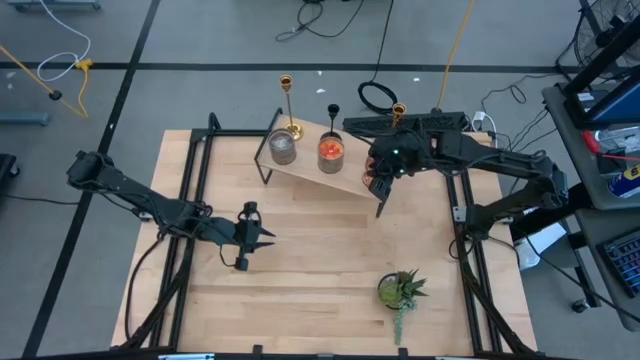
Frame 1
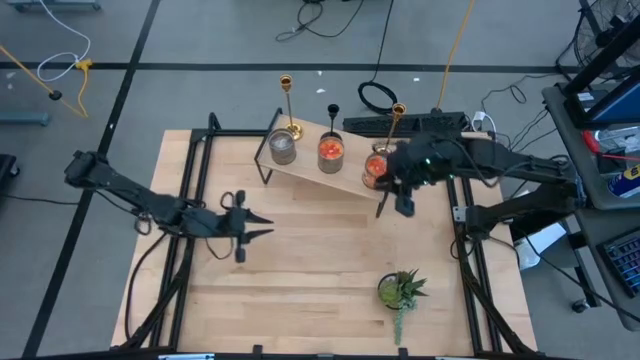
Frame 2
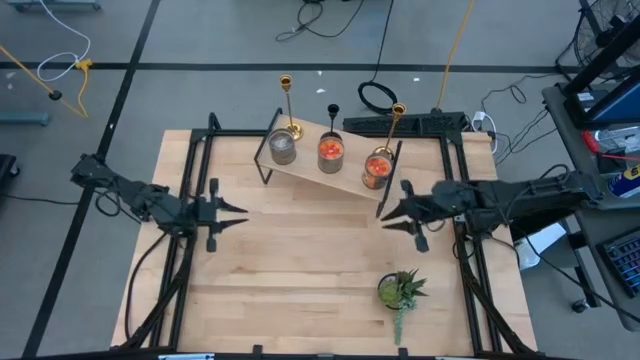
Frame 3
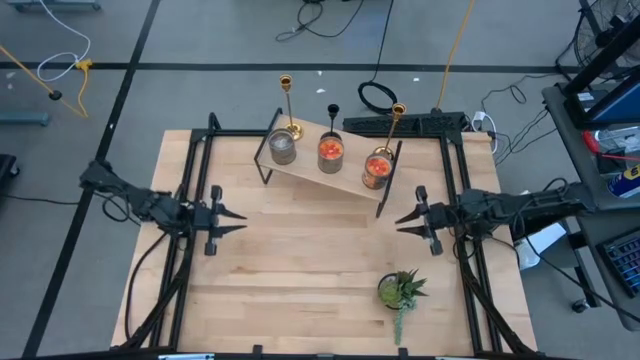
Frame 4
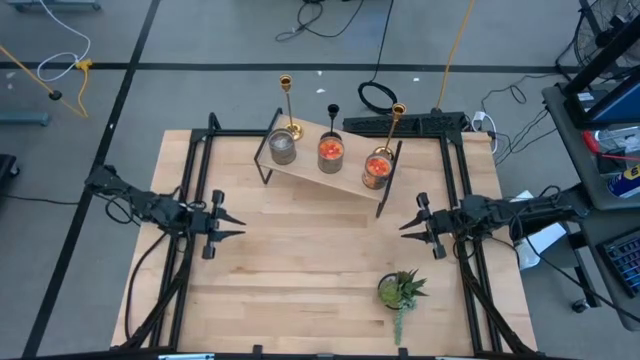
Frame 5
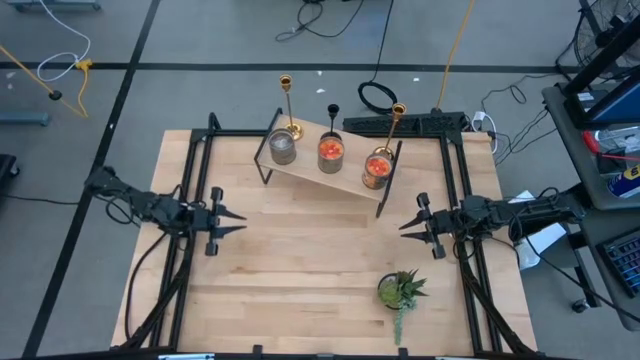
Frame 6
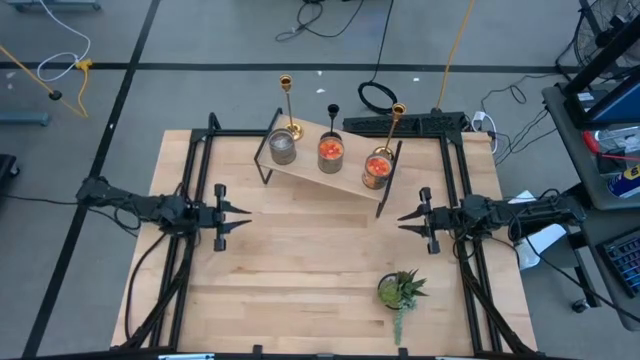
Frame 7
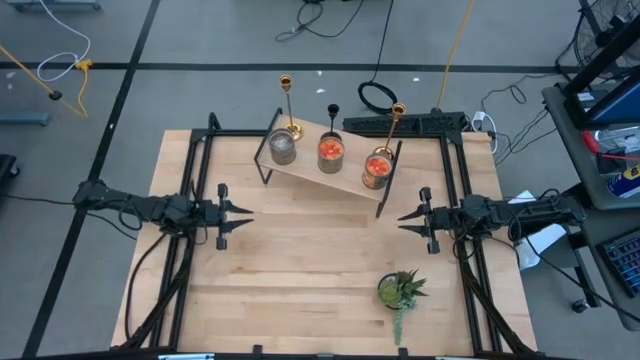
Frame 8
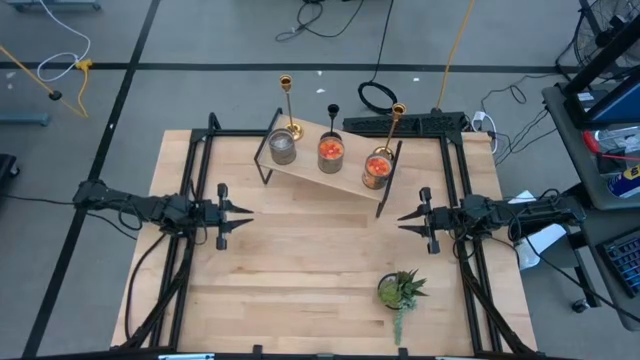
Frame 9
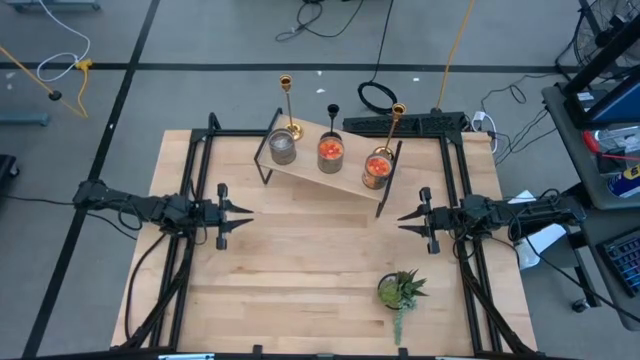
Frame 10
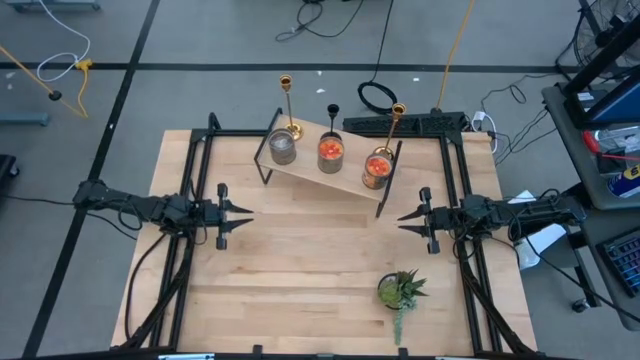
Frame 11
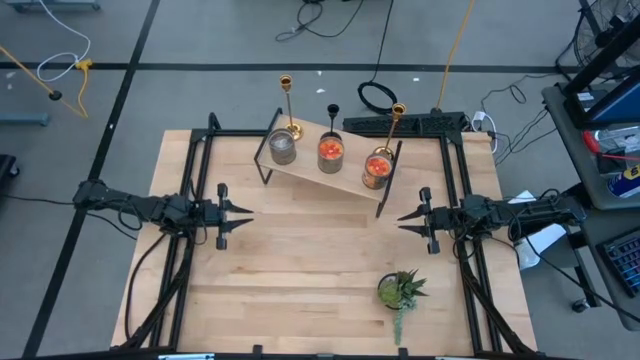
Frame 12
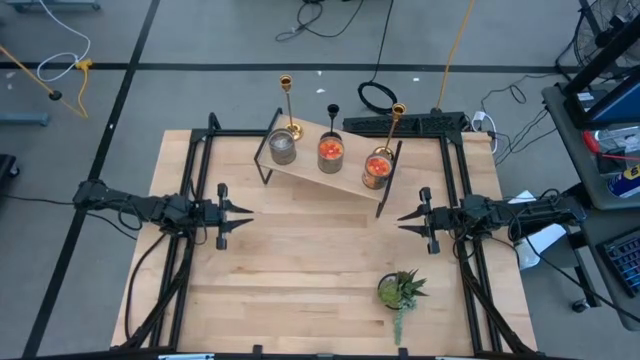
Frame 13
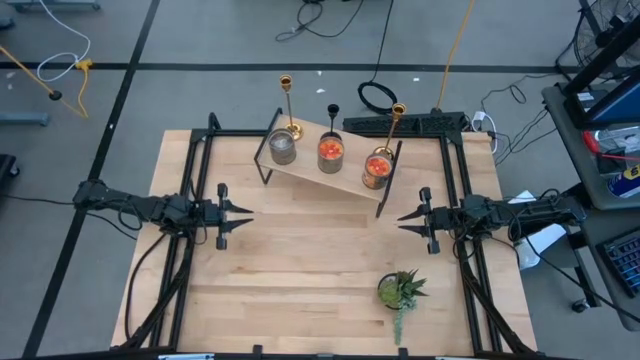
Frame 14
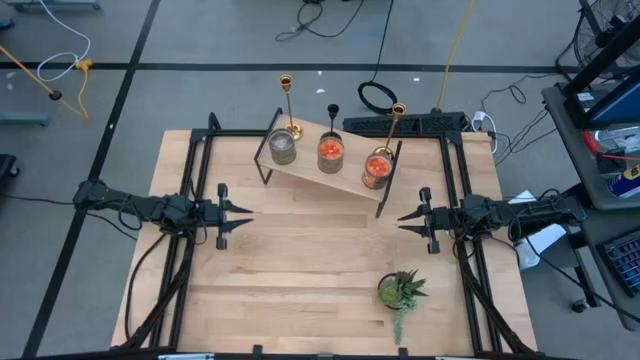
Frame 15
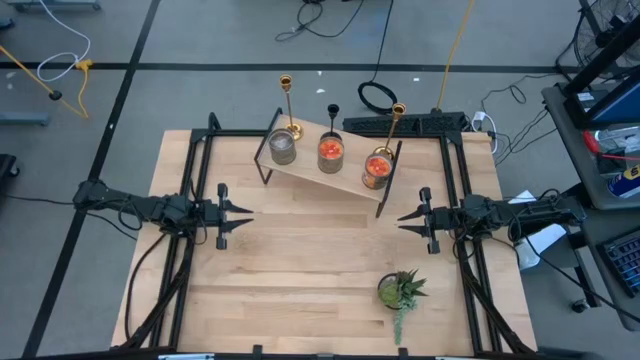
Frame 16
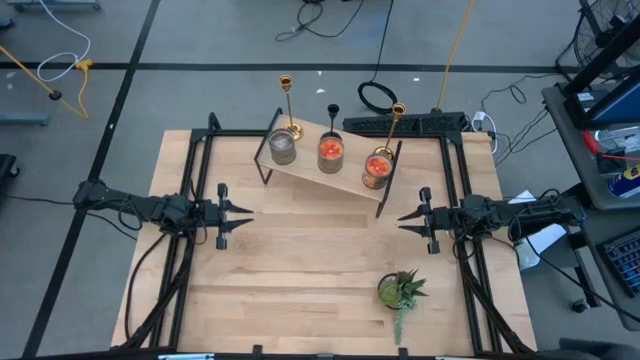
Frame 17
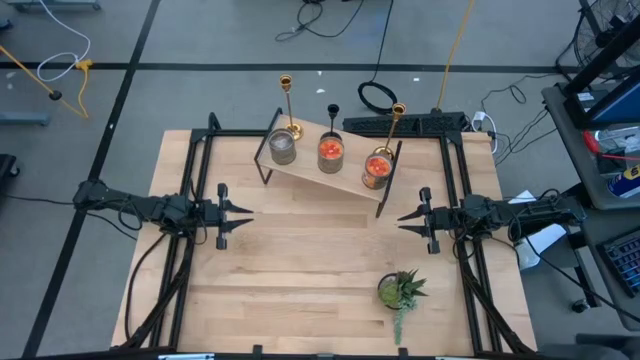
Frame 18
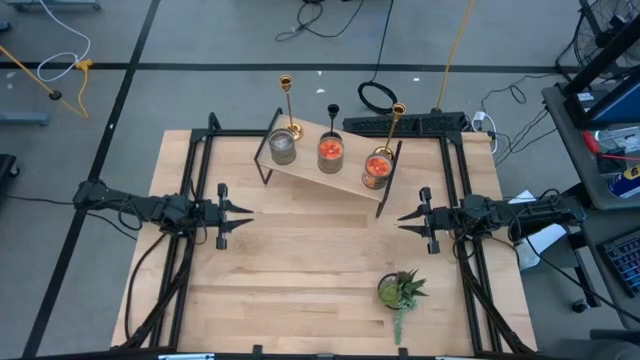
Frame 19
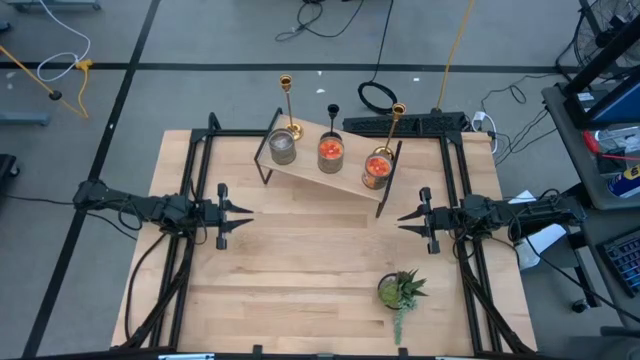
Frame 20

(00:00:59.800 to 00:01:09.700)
Task: Pick & Place candle stick holders
Return to Home Position

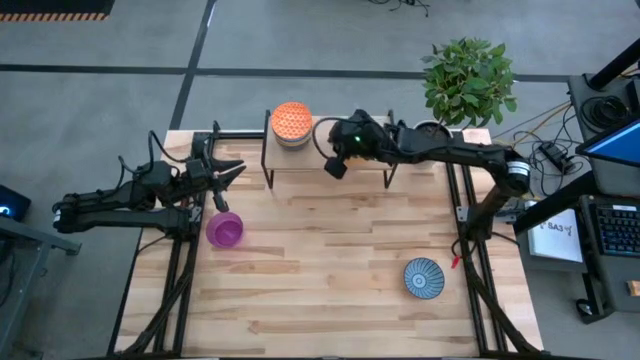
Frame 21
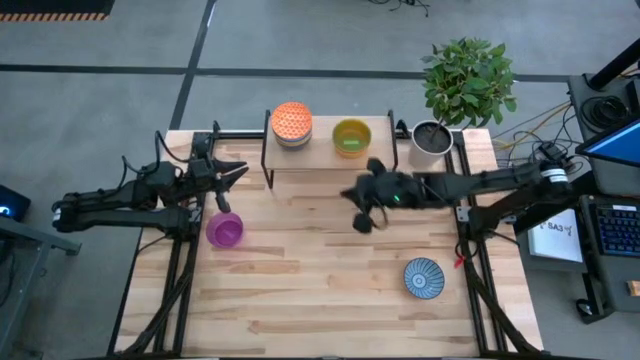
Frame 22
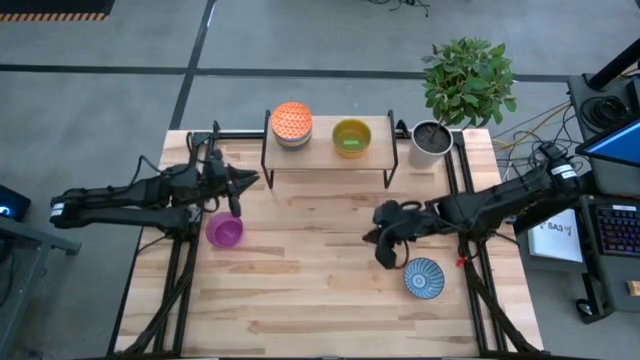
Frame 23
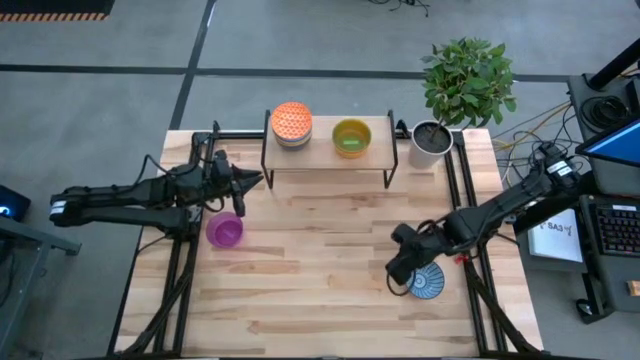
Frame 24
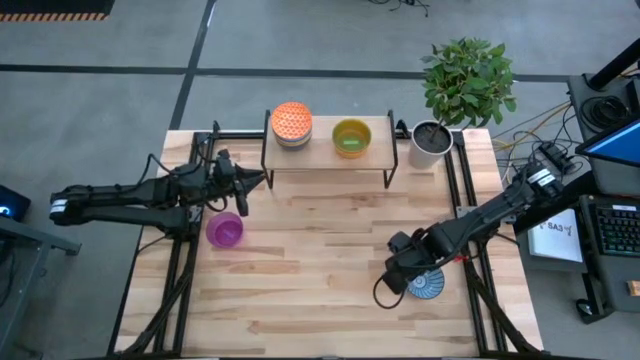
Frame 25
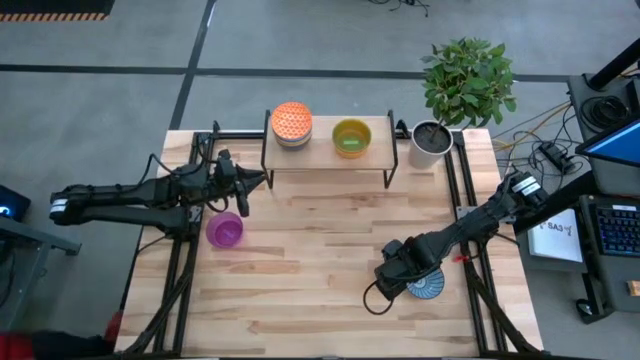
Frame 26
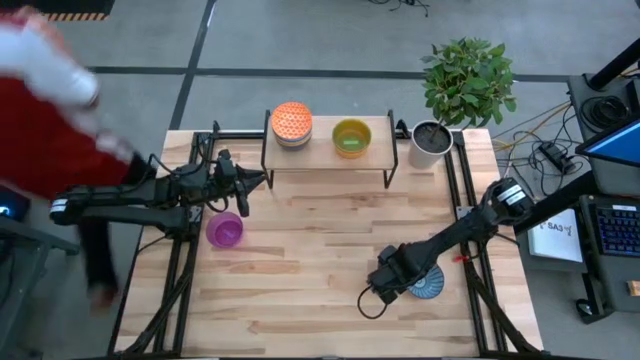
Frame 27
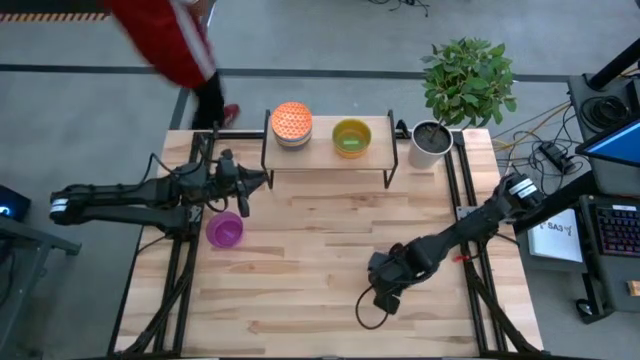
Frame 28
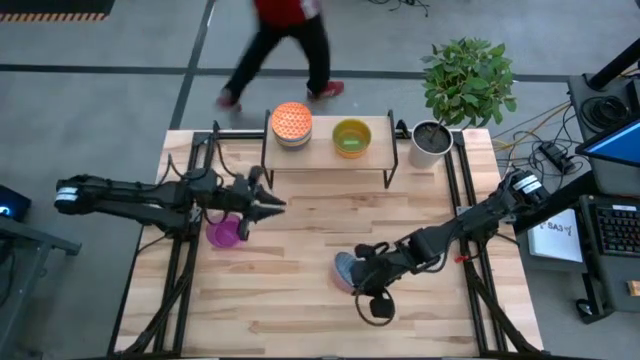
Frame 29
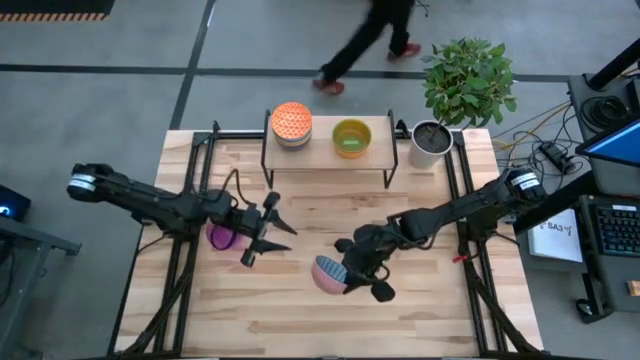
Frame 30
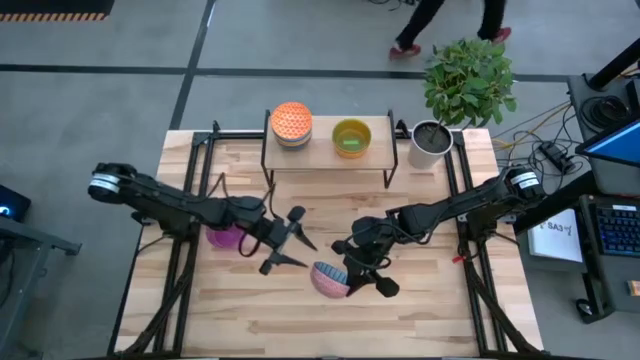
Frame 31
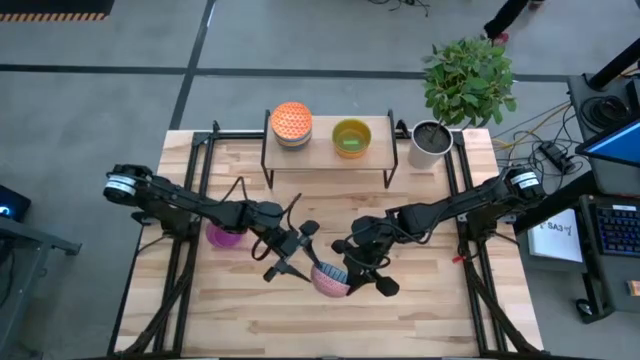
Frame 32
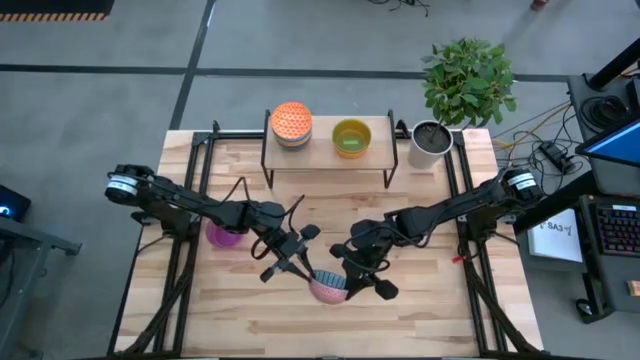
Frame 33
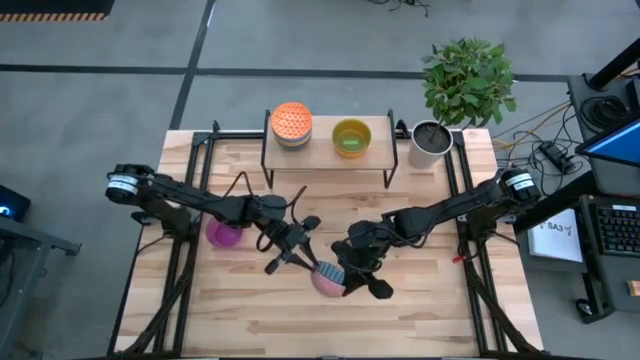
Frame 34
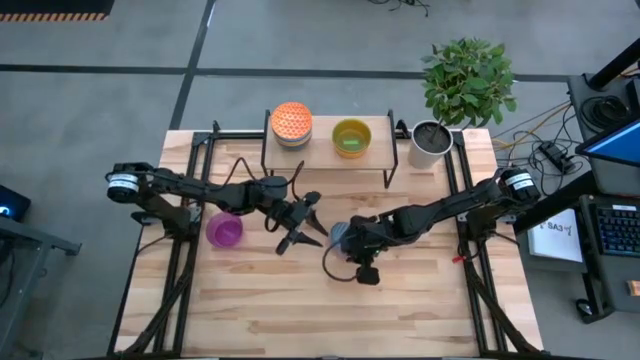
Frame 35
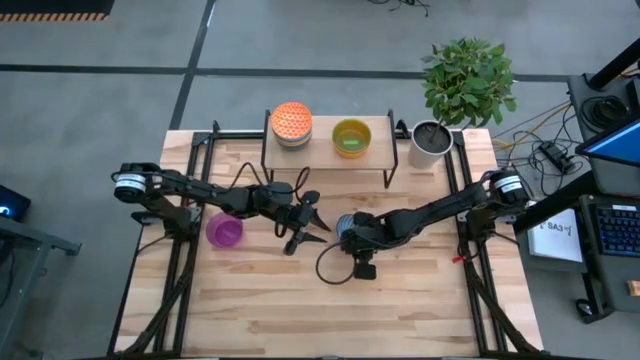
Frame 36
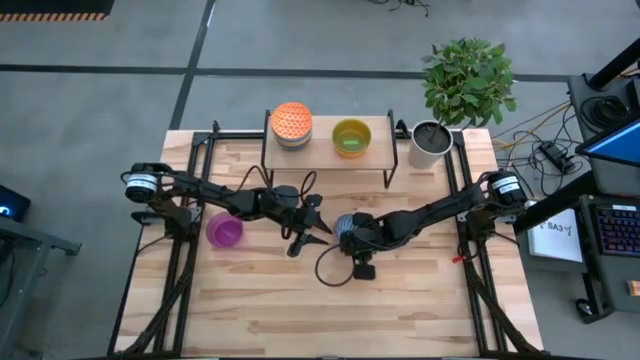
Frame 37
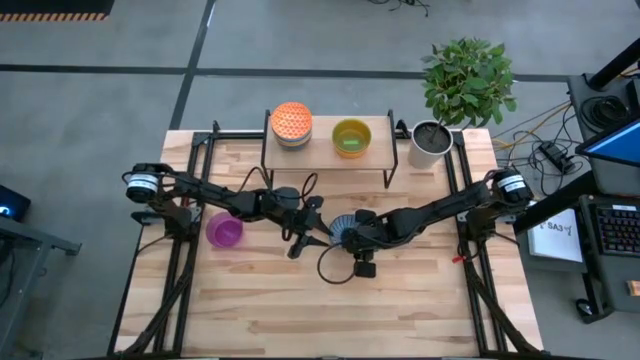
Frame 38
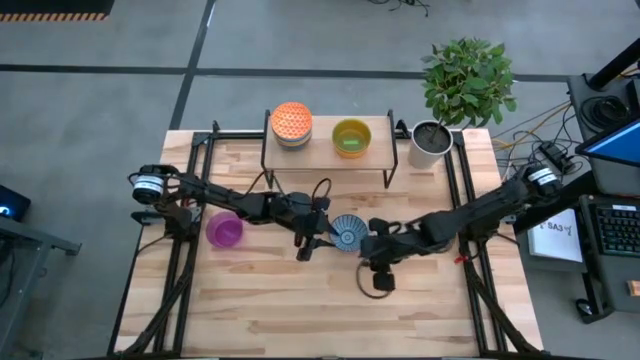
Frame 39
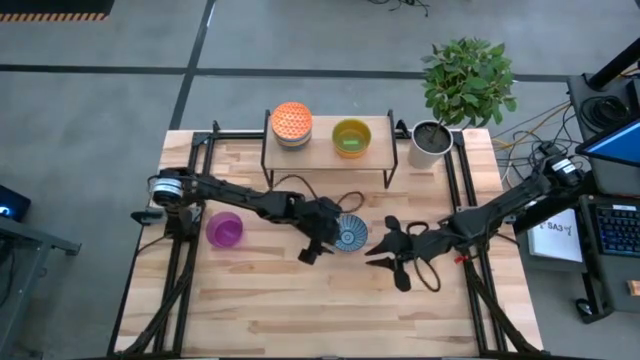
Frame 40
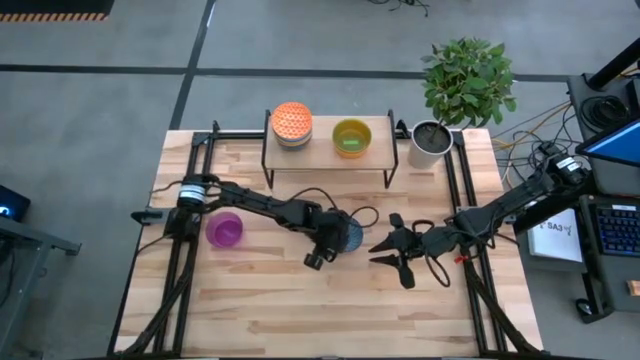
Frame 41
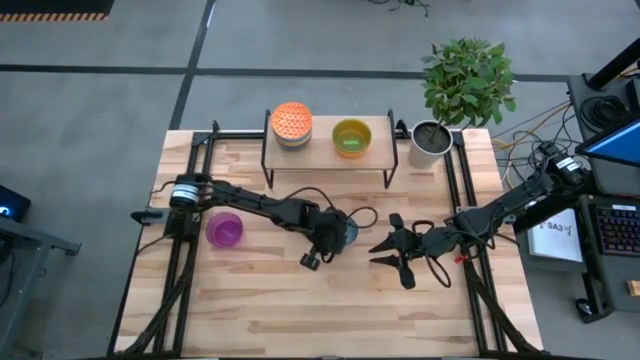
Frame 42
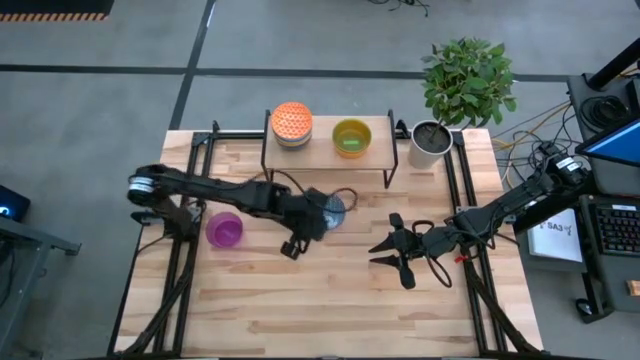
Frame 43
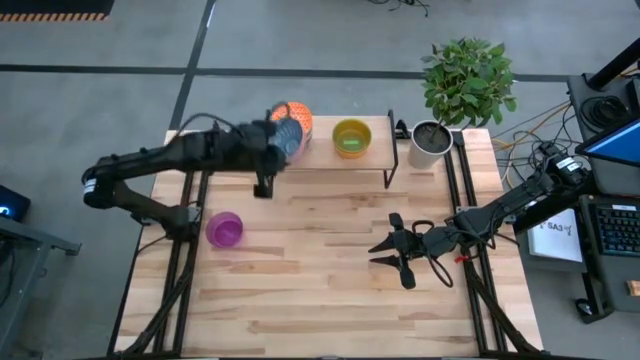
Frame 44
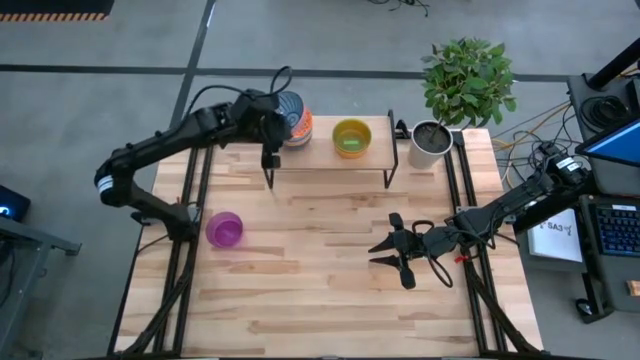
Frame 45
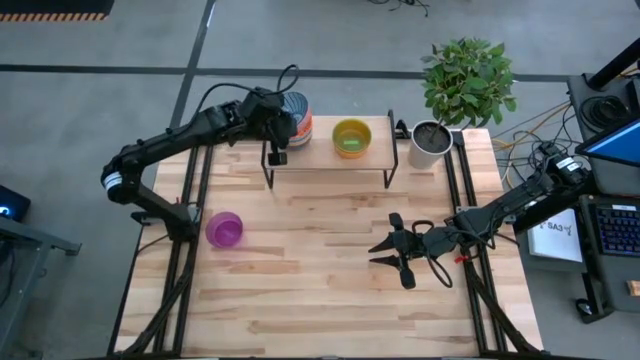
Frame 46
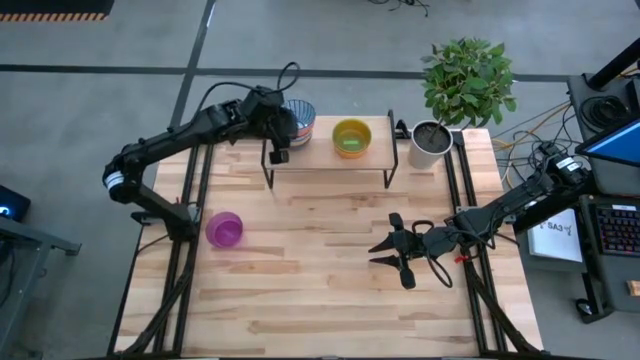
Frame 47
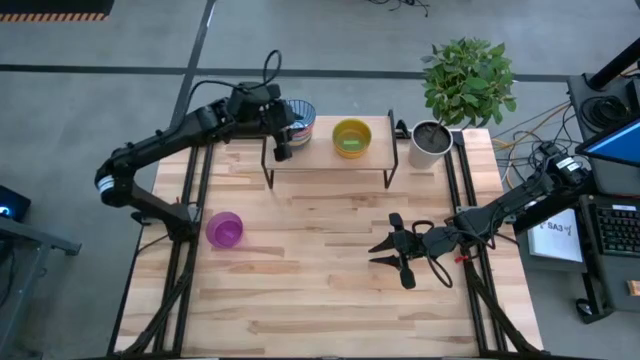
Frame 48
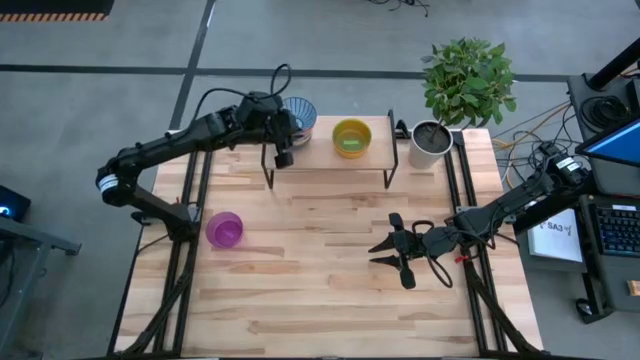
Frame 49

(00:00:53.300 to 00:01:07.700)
Task: Place and stack bowls onto a shelf
Stack the patterned blue bowl on top of the patterned orange bowl on the shelf
